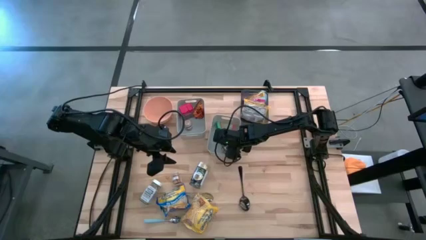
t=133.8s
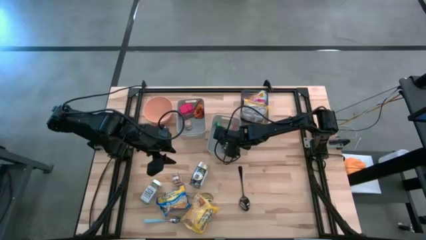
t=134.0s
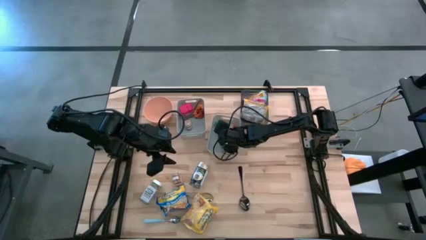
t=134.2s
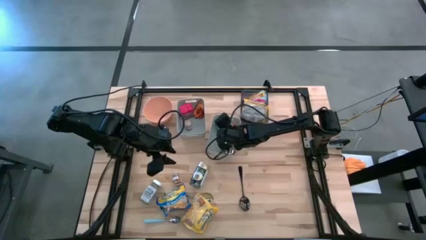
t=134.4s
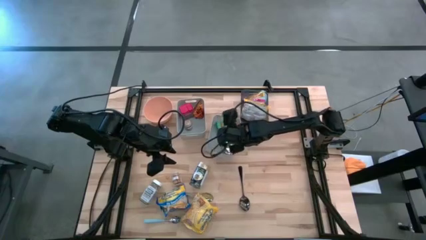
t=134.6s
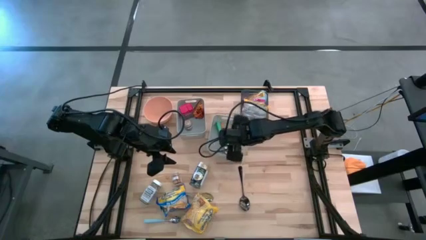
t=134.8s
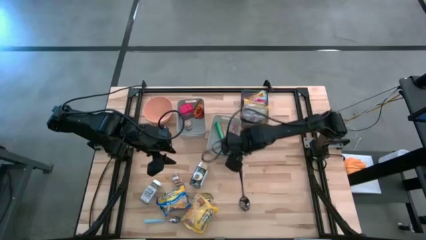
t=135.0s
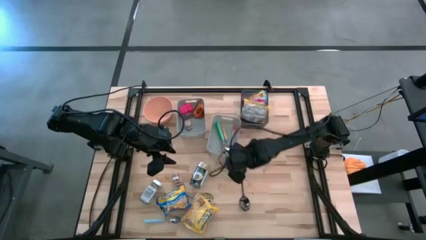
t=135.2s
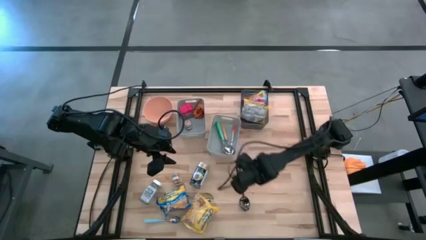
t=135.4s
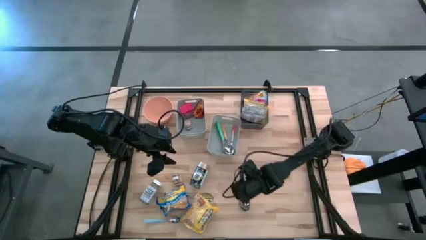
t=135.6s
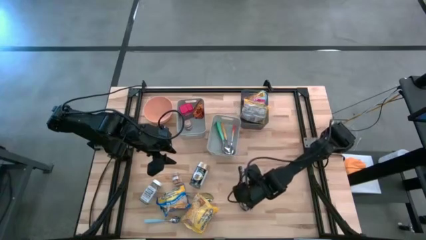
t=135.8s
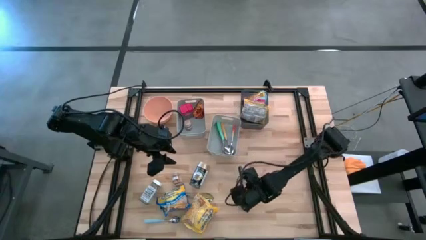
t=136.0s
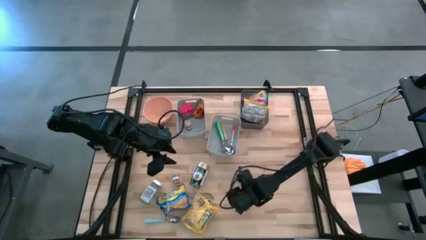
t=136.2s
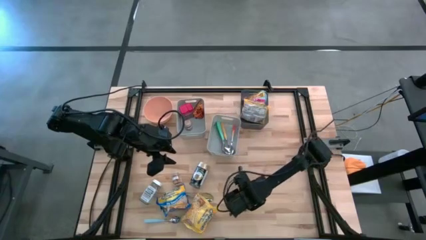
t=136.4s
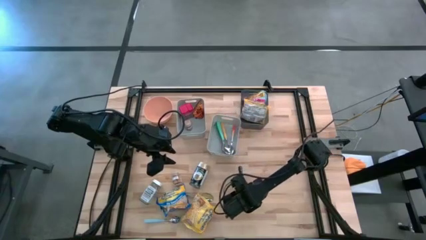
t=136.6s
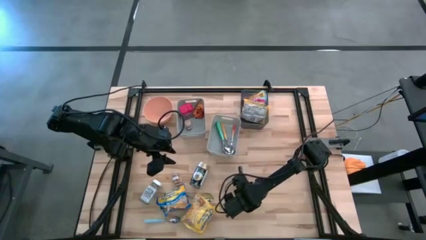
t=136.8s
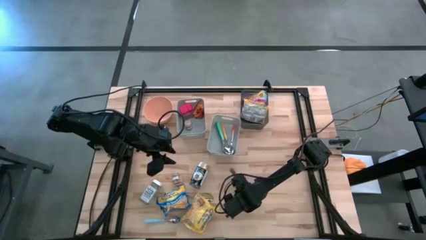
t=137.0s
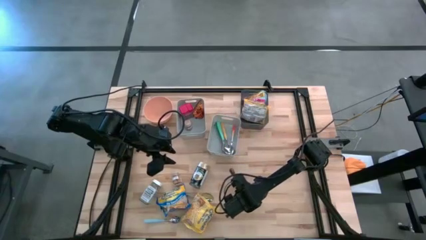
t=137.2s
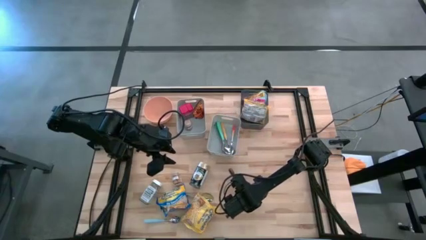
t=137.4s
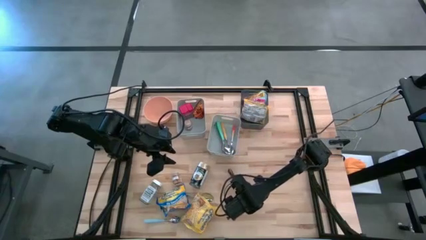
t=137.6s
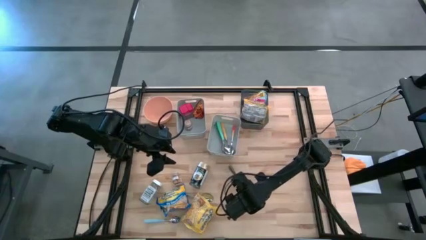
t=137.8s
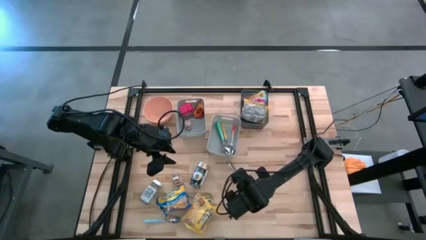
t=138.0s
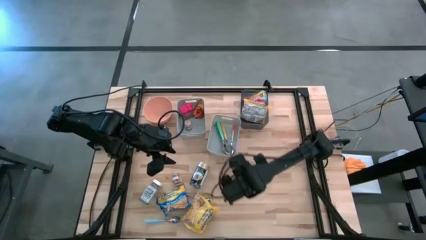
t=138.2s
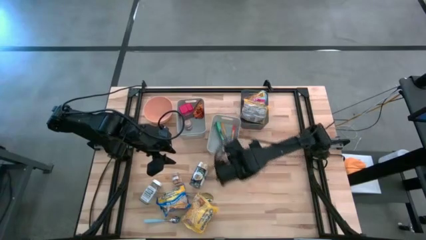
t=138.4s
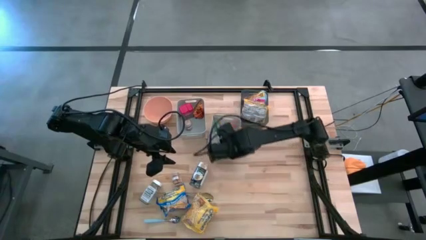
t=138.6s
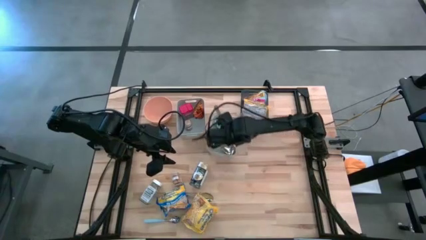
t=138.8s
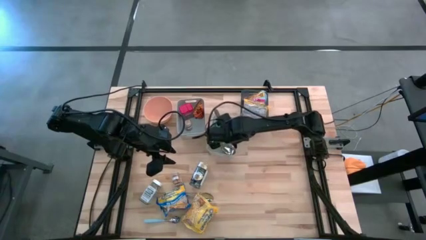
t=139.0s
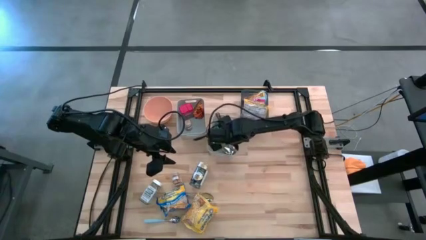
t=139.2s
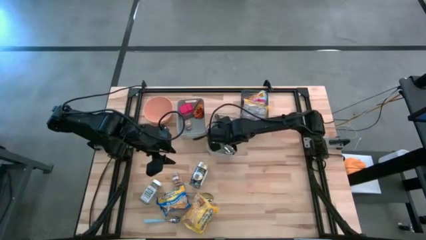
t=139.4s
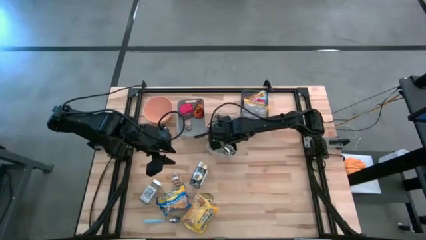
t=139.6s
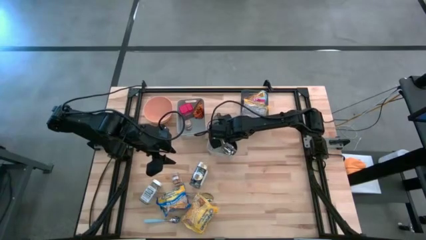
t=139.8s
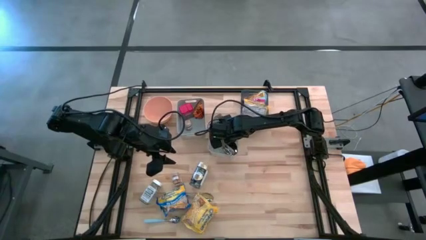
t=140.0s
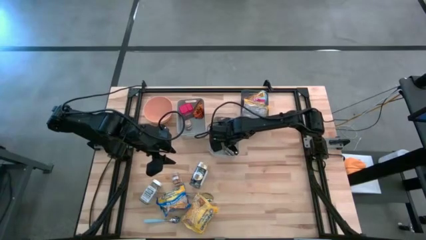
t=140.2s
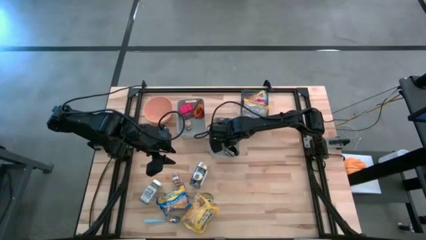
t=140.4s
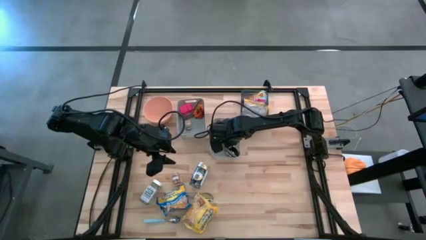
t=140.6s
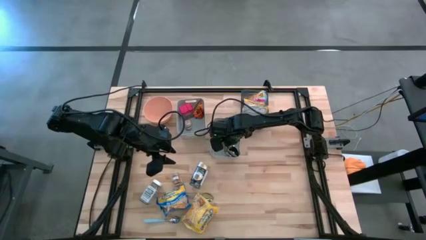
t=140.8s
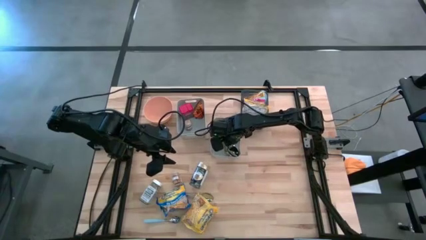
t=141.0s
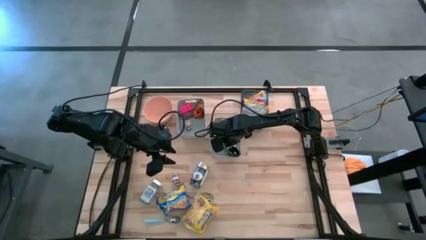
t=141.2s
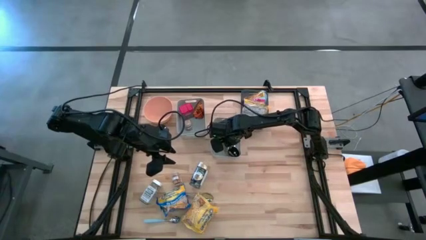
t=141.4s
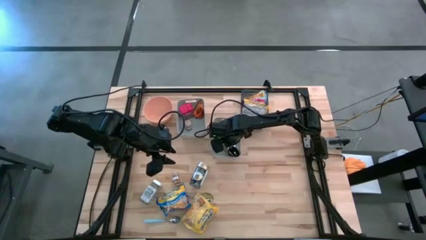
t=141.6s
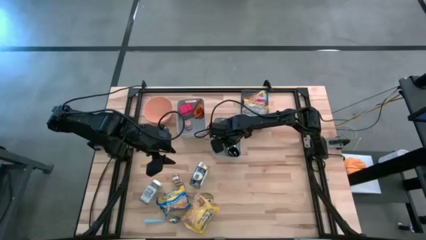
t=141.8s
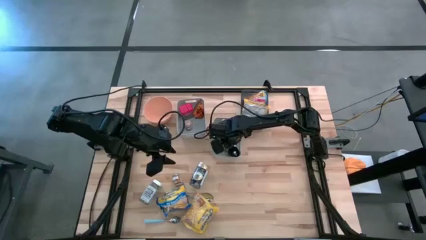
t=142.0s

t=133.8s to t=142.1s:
Put the black spoon into the right gray bin
